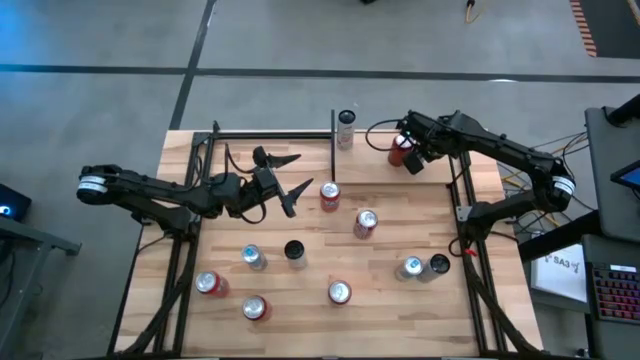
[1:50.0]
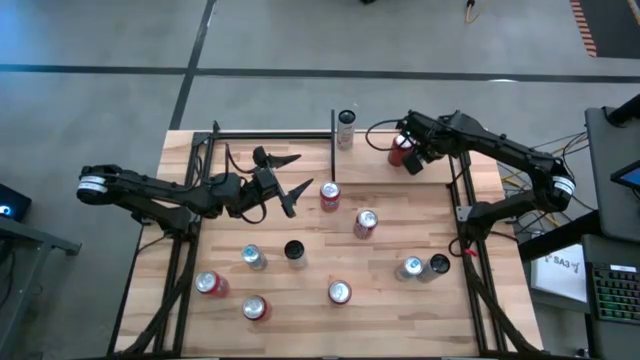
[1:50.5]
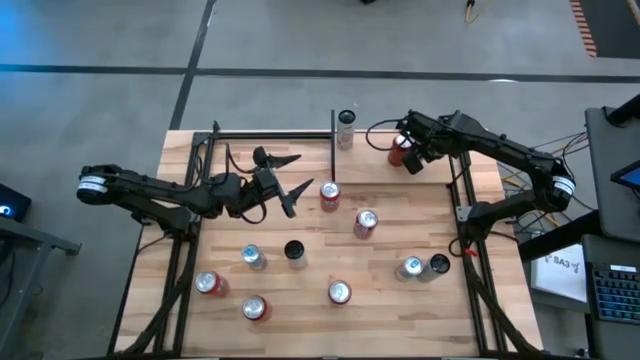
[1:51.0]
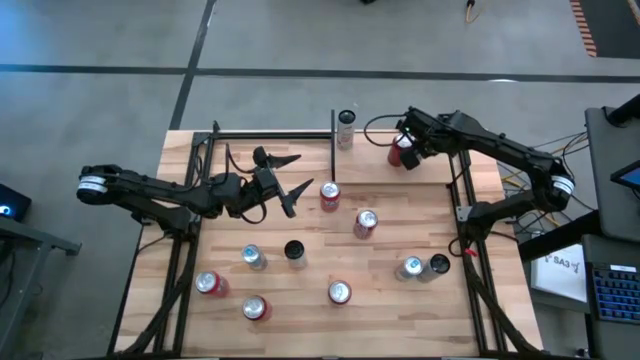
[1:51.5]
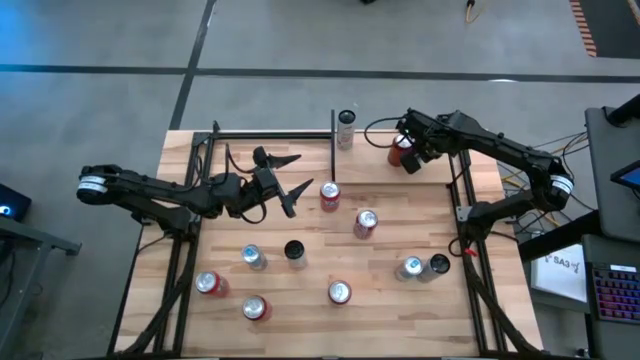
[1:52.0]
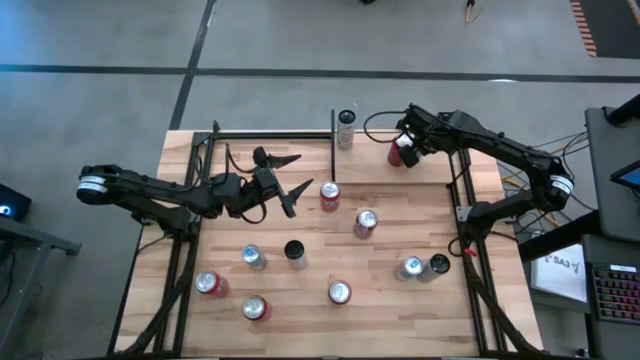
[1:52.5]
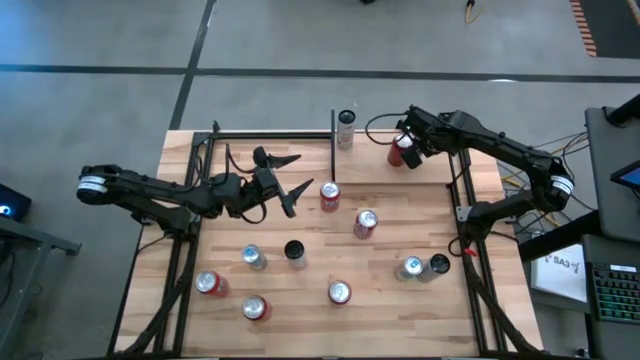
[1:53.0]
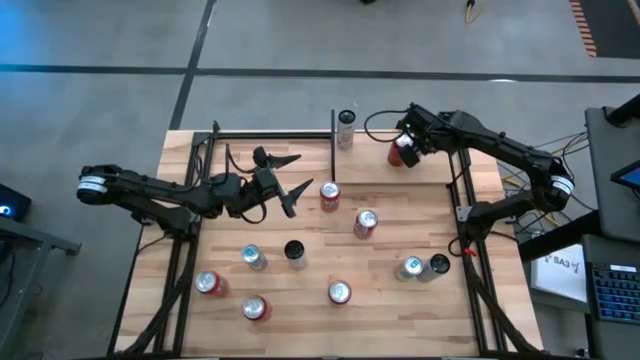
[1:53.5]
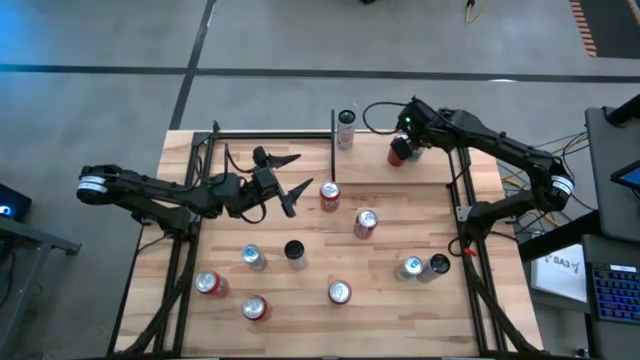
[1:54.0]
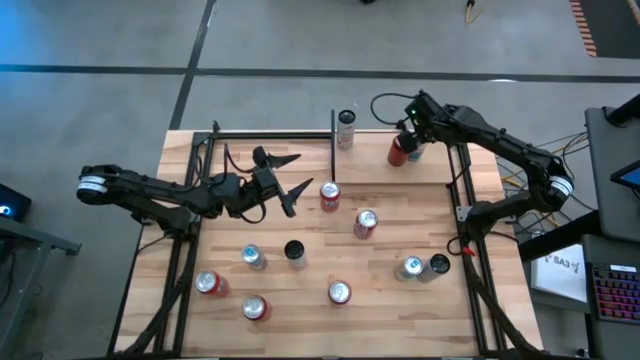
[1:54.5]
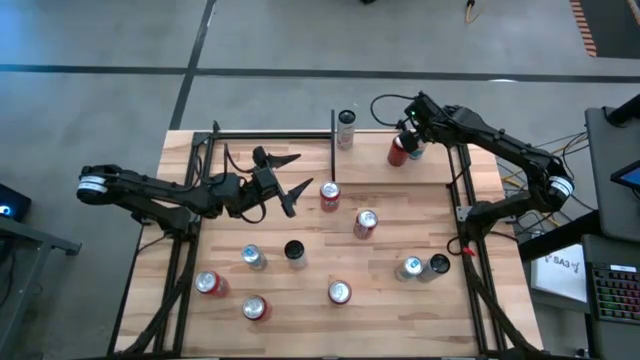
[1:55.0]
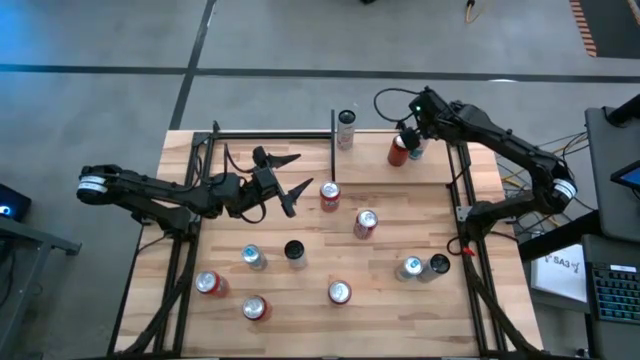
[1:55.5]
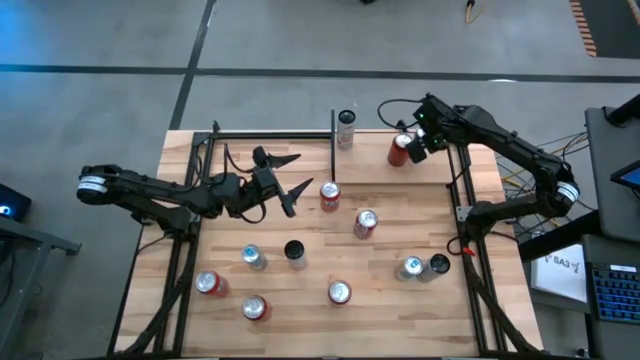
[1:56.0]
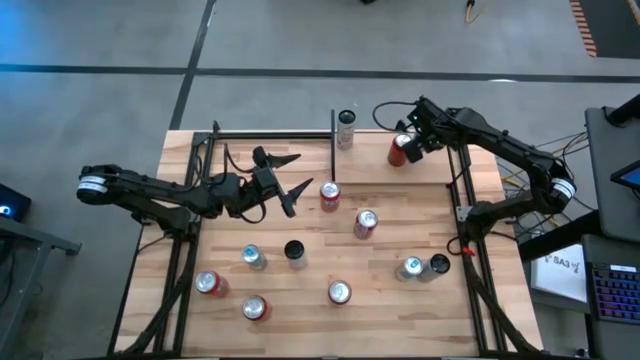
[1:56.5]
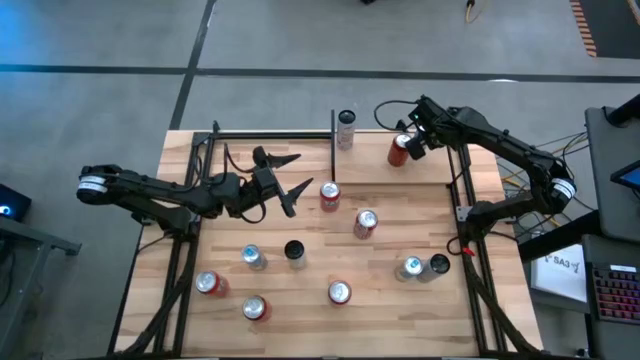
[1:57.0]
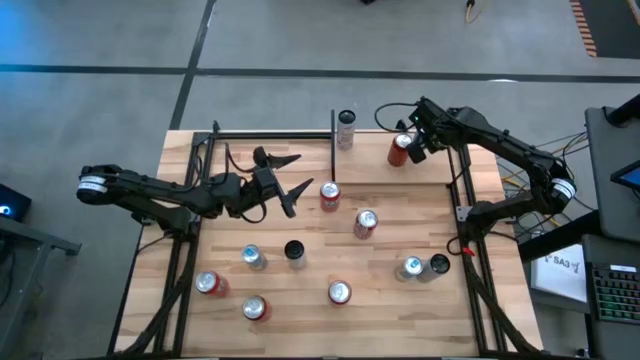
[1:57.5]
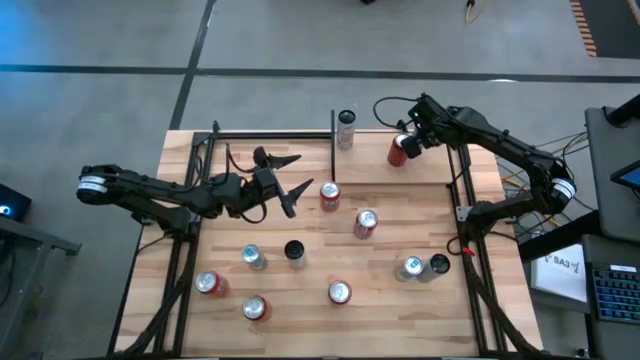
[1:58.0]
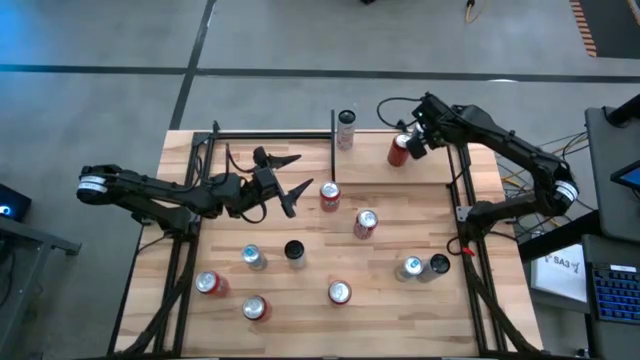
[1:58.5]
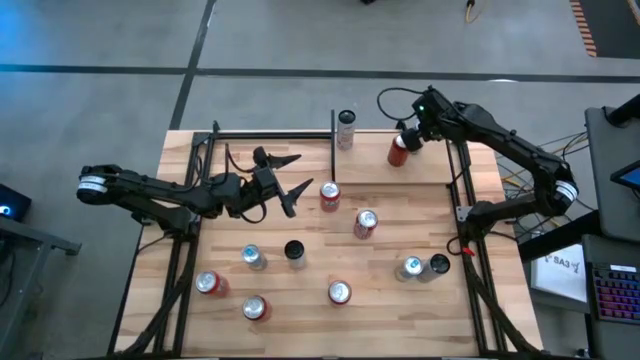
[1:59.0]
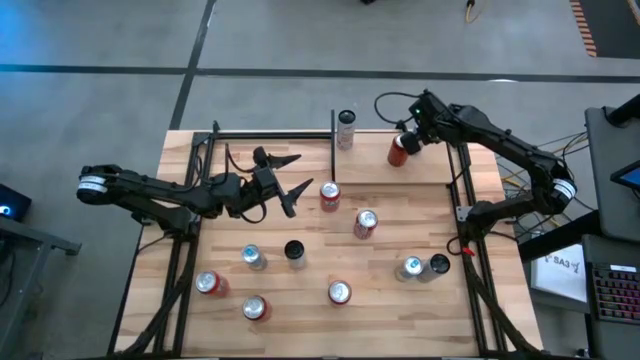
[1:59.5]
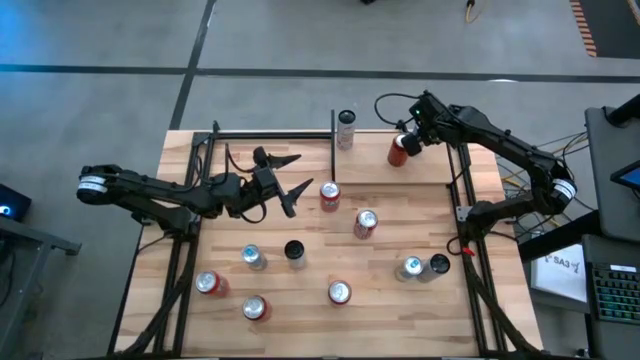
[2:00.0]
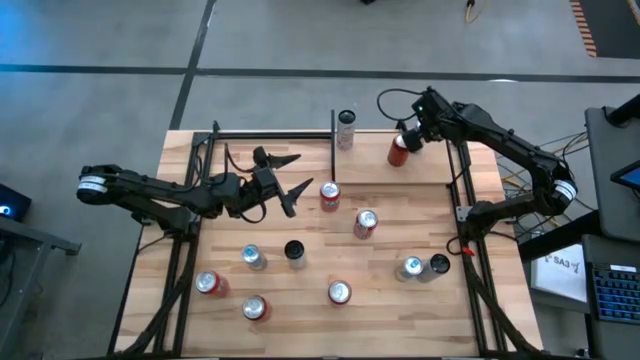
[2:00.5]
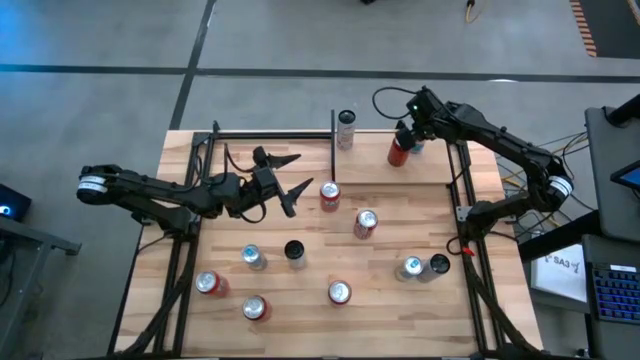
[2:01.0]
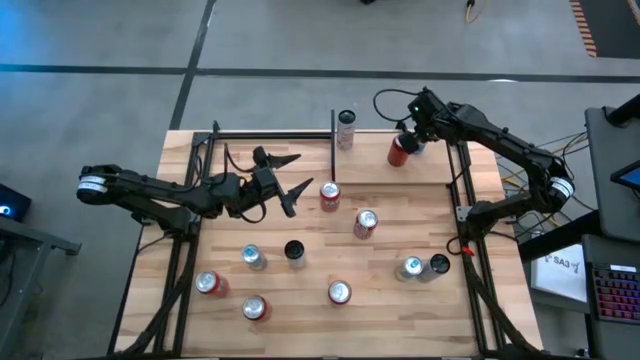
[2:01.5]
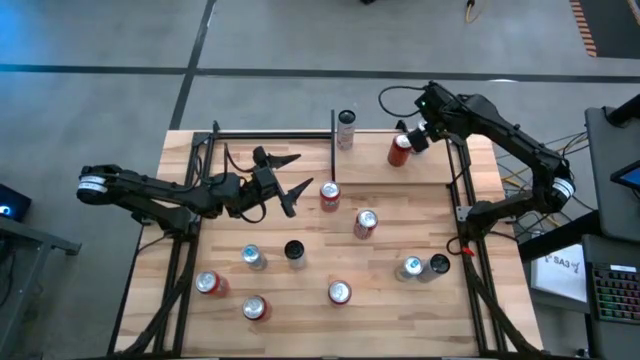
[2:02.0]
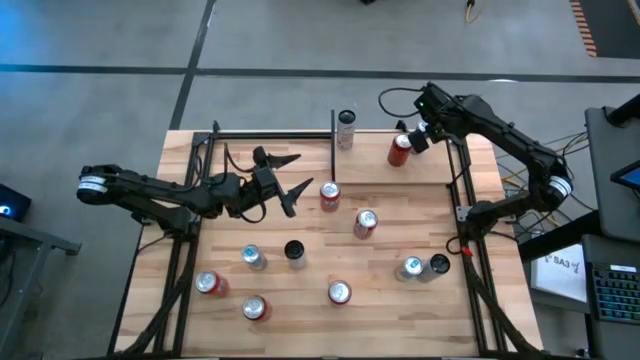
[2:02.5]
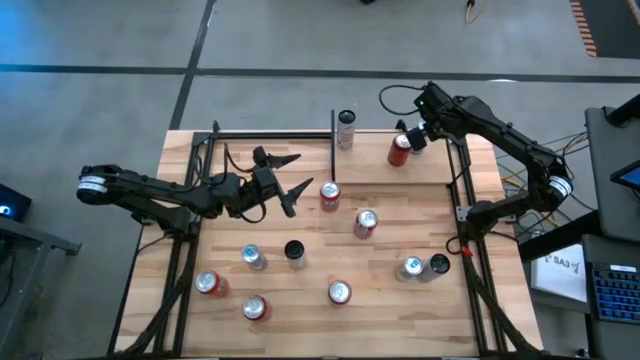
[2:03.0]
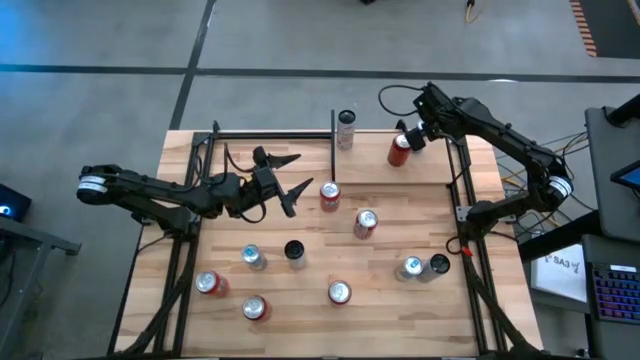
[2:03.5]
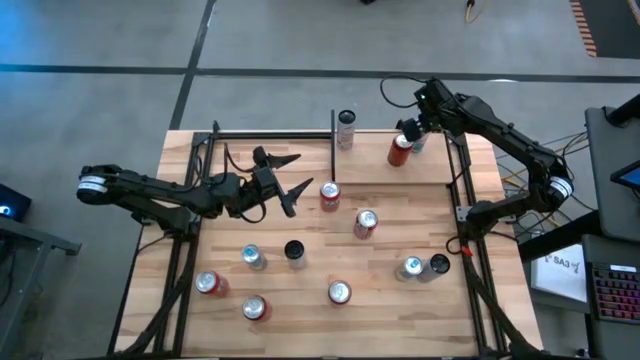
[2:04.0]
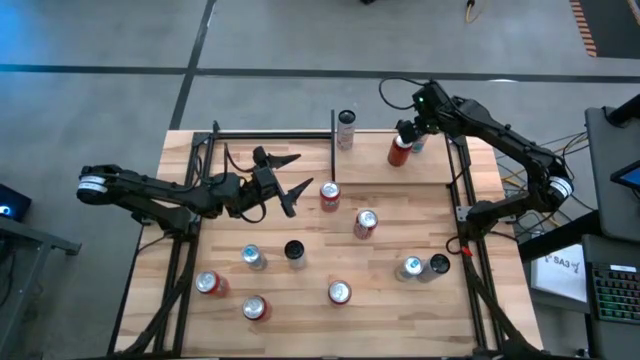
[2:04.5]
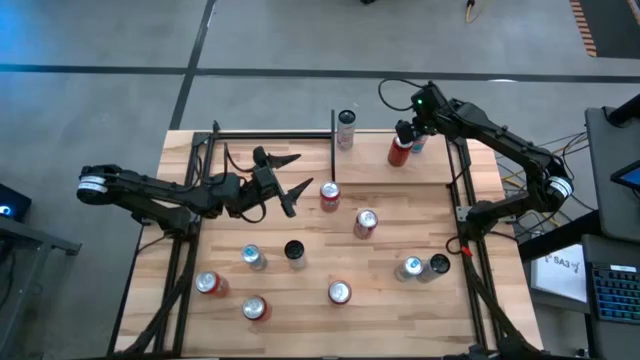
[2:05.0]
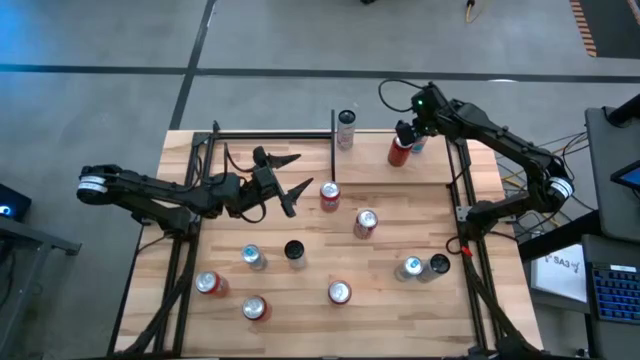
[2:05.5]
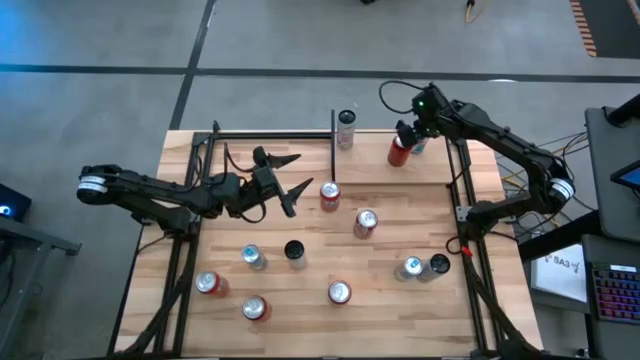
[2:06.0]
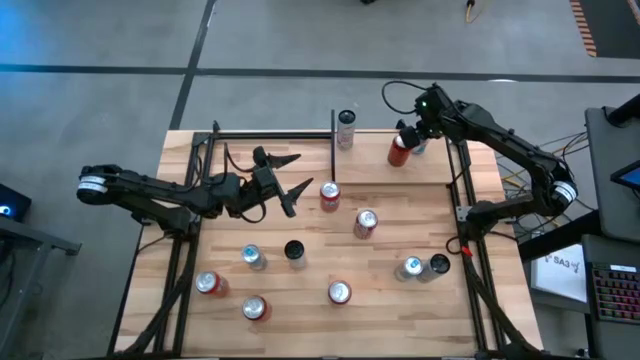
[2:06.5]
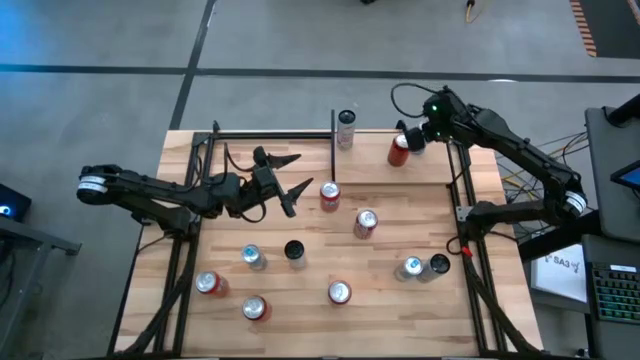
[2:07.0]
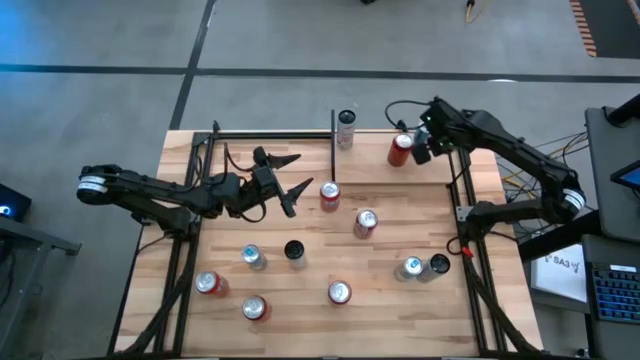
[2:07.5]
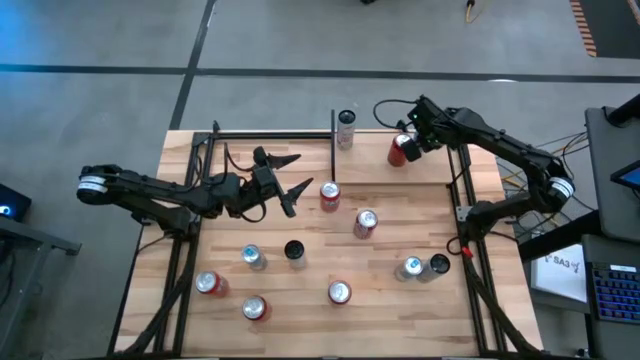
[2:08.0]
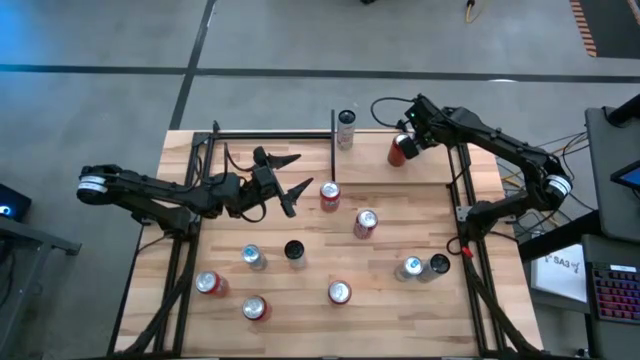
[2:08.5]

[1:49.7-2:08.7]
Task: Place canned beverage on shelf
Put the top blue soda can on the shelf

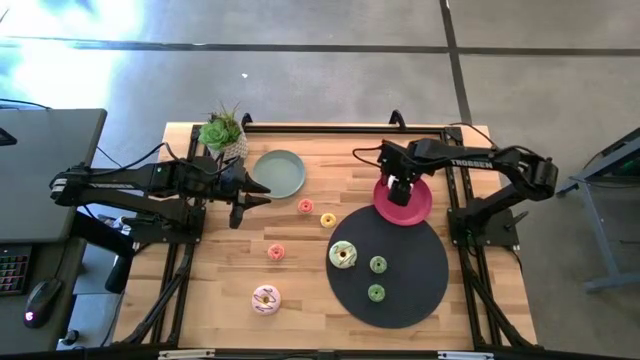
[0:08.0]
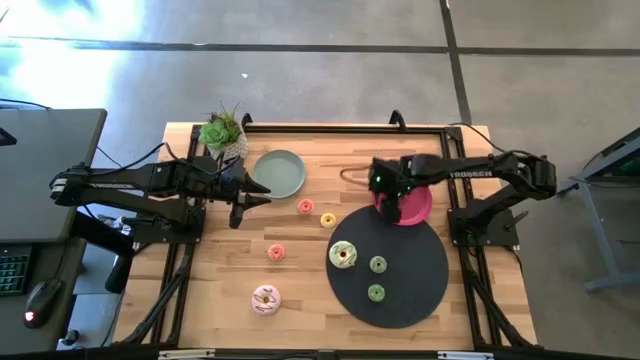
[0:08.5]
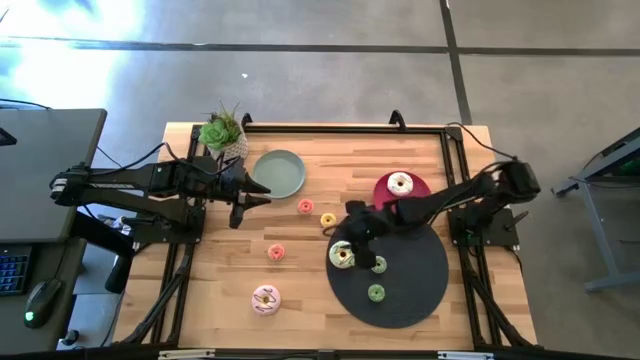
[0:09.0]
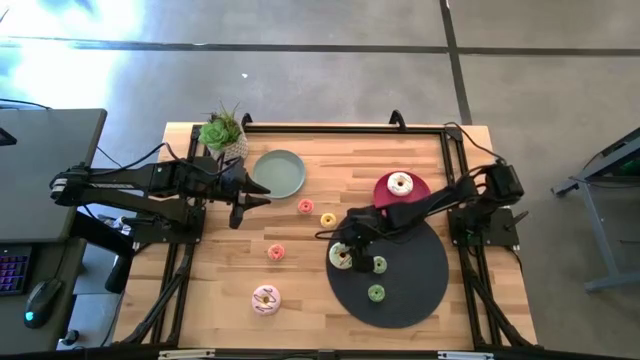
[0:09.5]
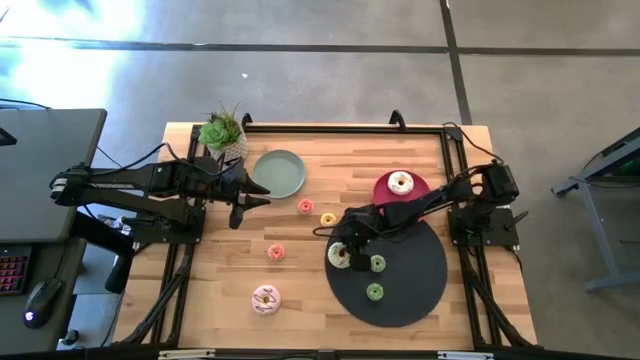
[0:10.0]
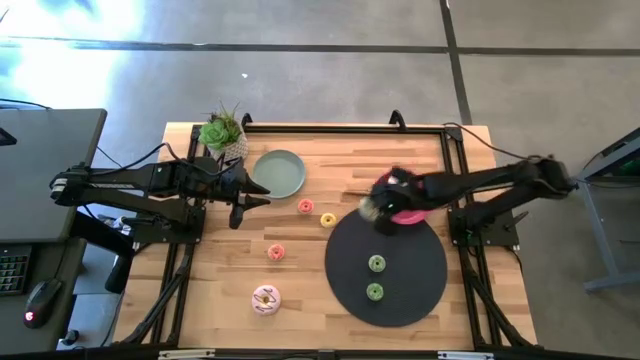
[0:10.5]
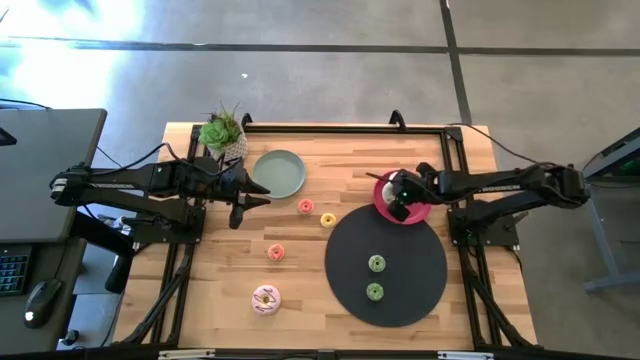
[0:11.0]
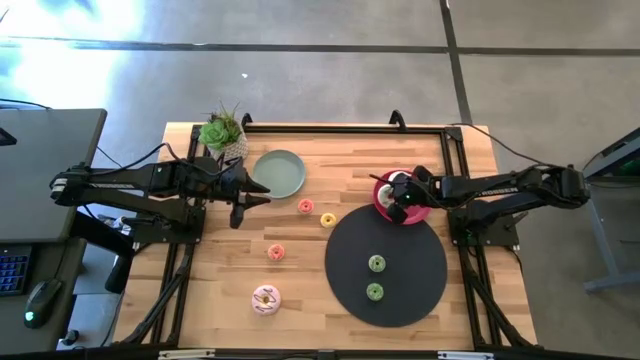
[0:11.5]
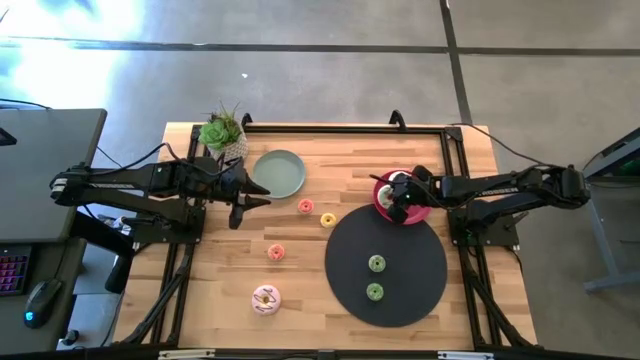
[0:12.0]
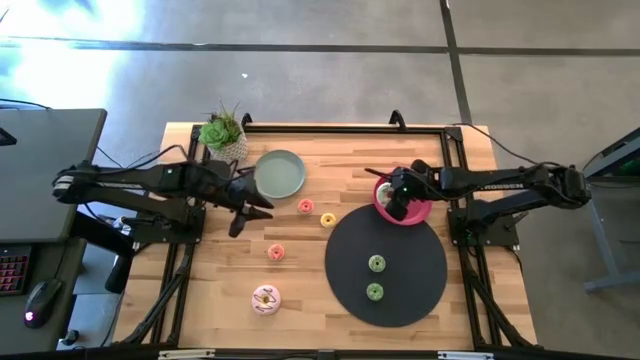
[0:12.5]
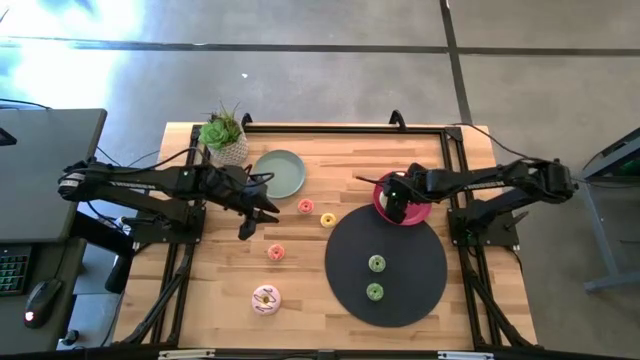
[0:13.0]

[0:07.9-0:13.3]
Task: Pick & Place donuts
Put the big light blue donut on the pink plate
